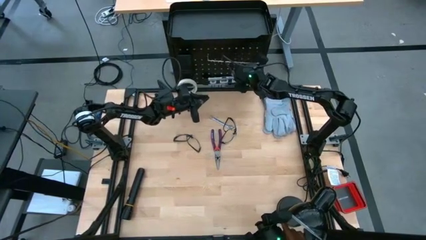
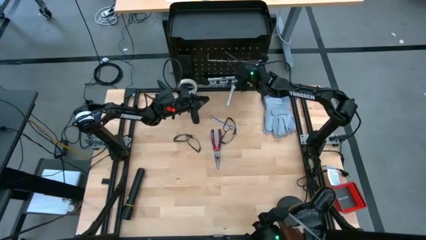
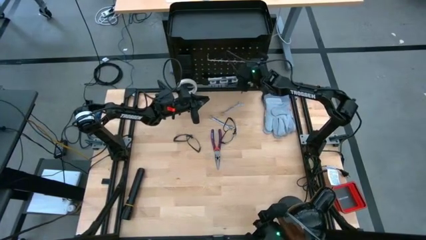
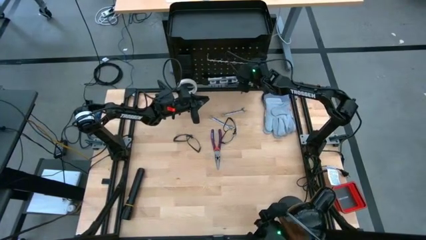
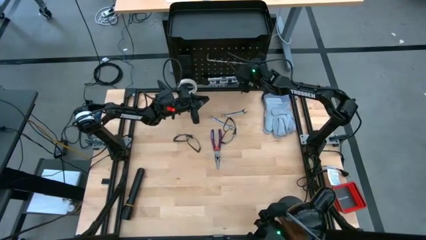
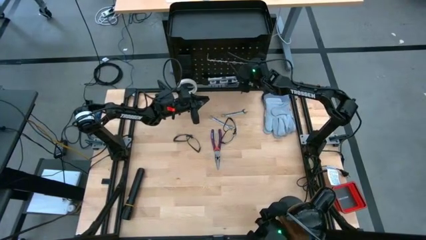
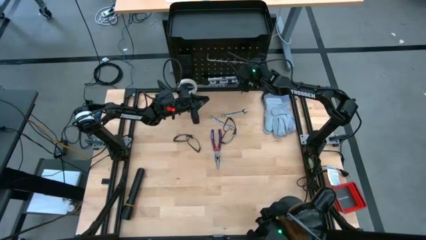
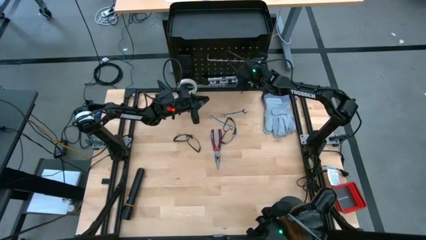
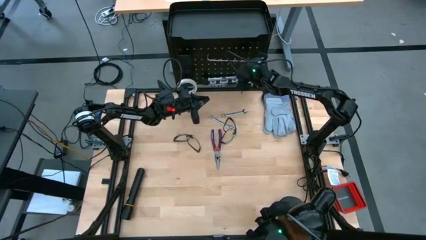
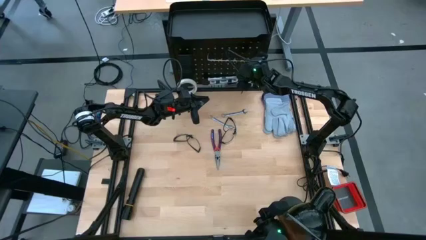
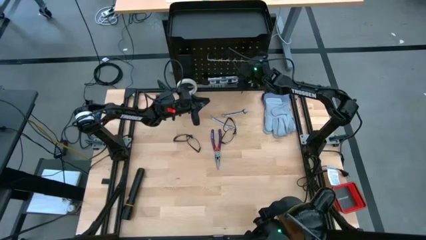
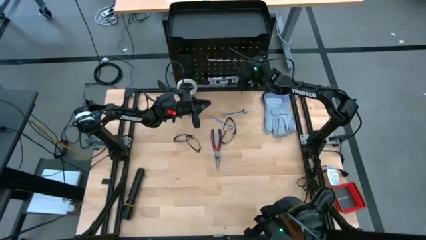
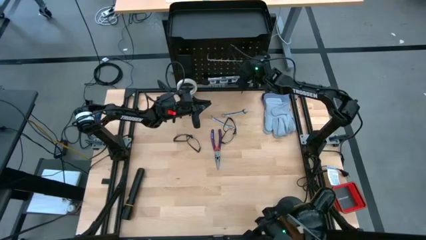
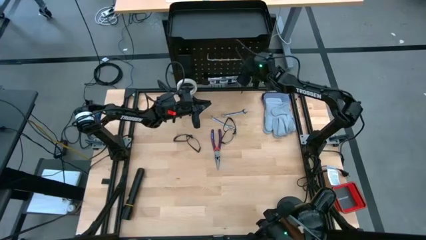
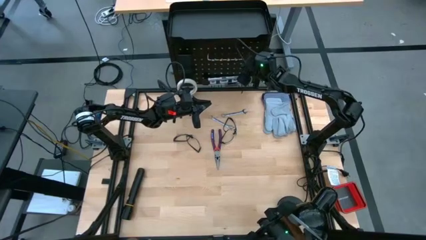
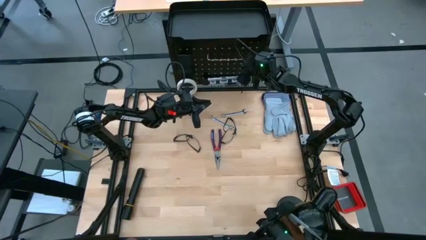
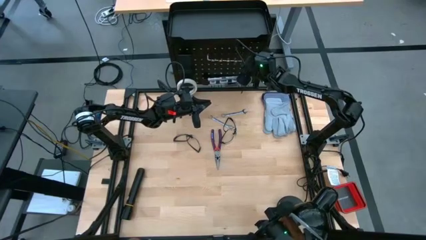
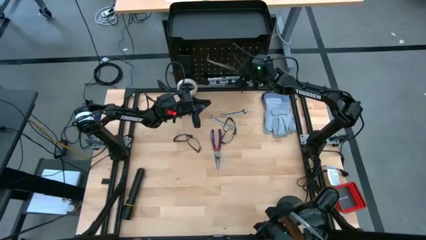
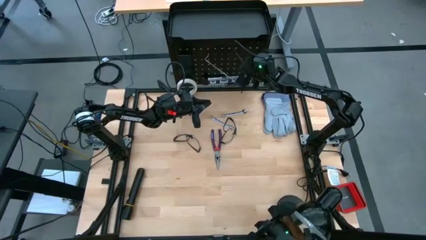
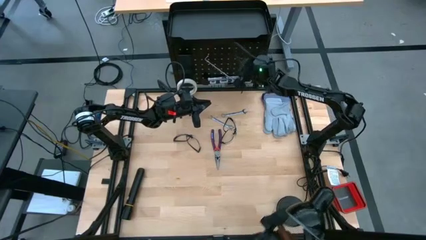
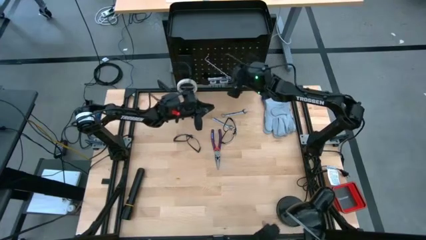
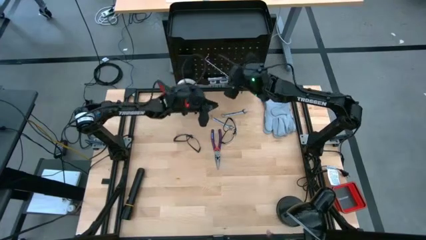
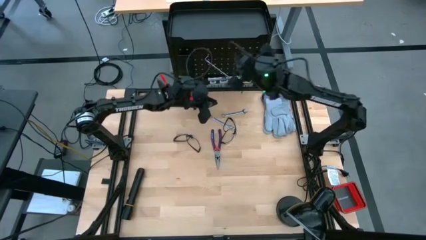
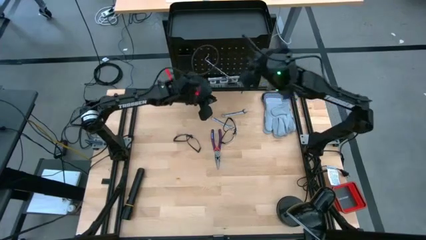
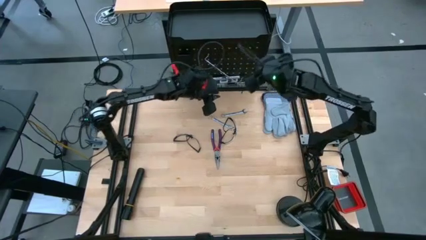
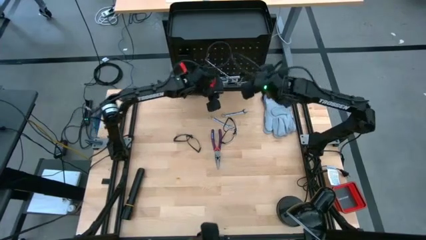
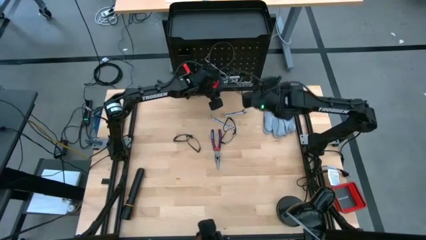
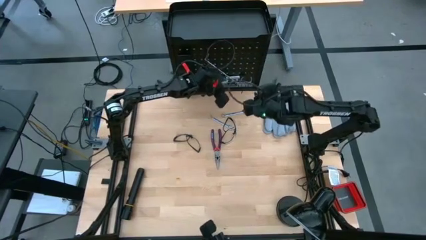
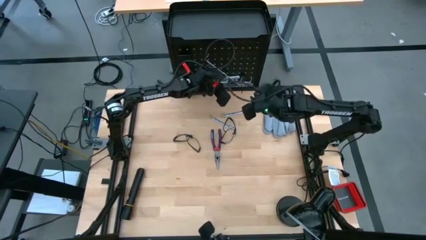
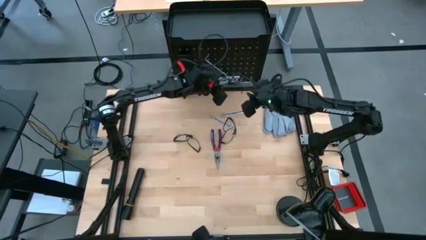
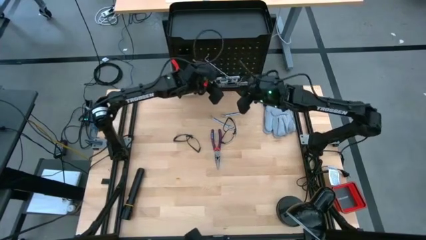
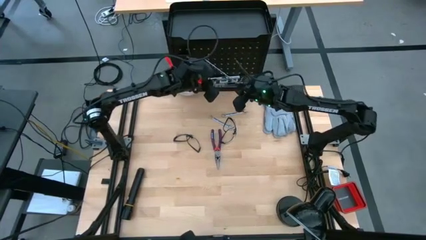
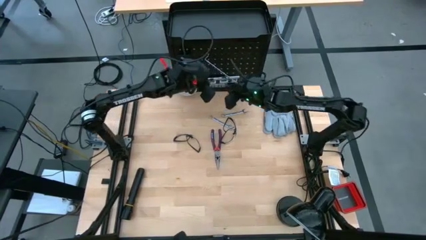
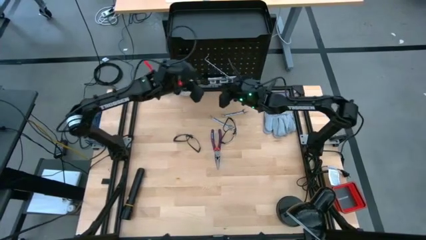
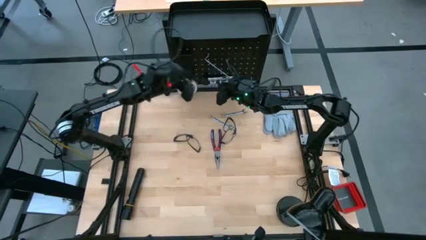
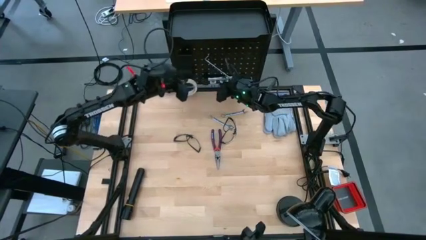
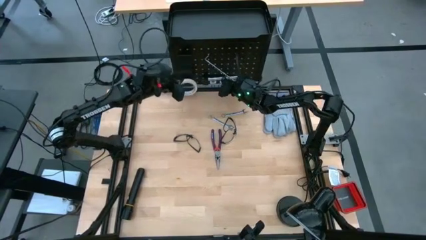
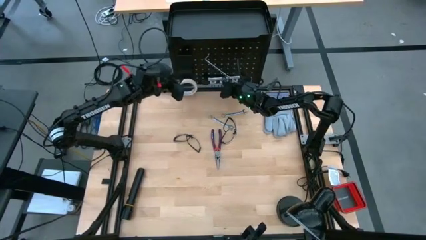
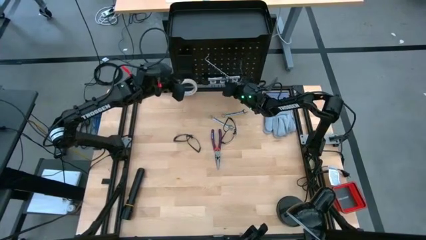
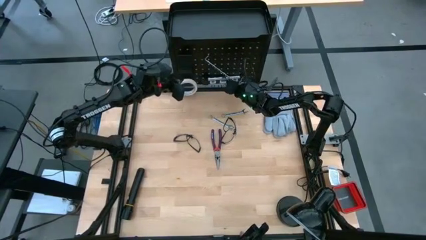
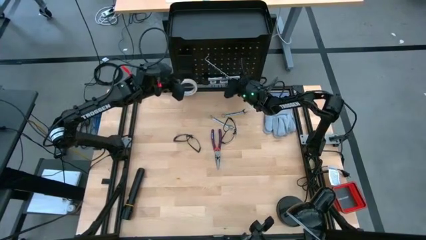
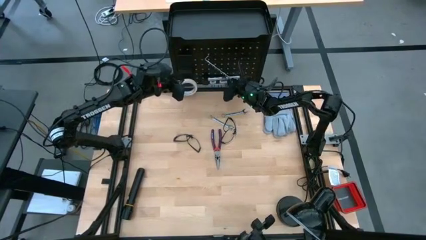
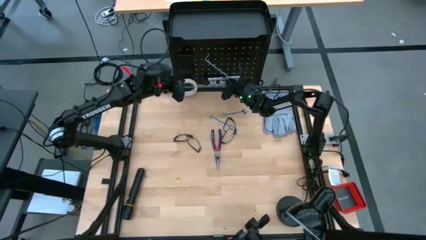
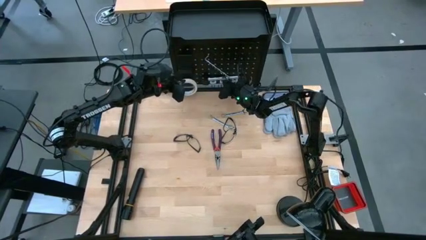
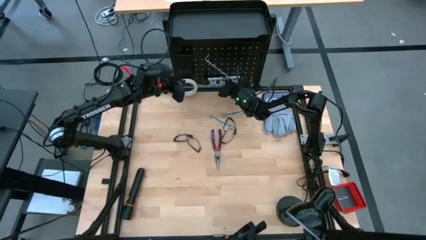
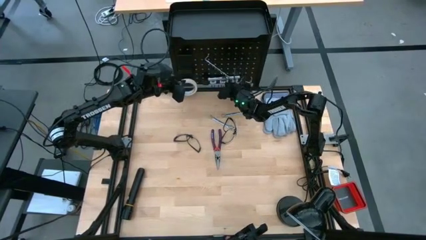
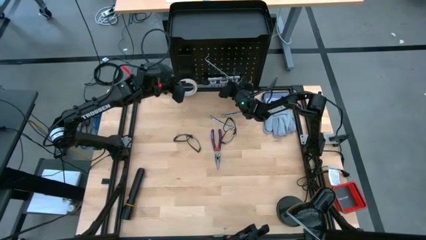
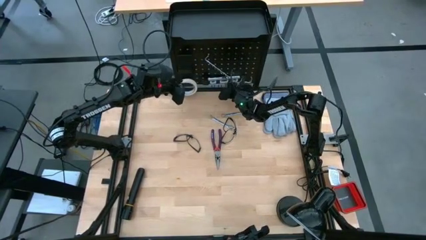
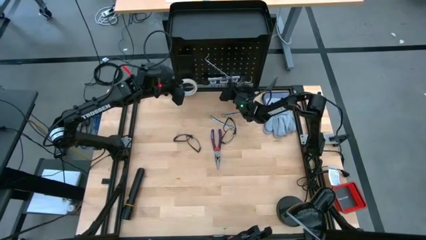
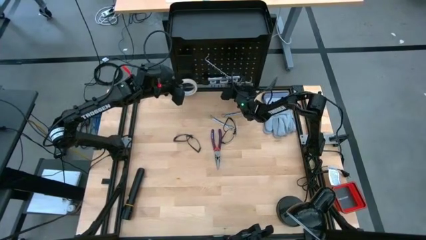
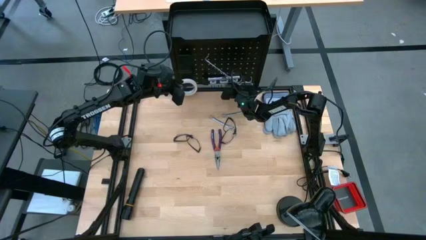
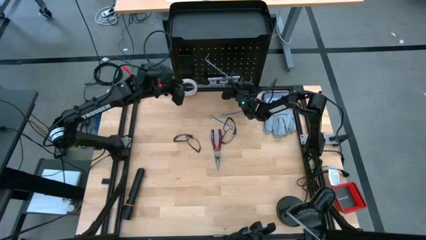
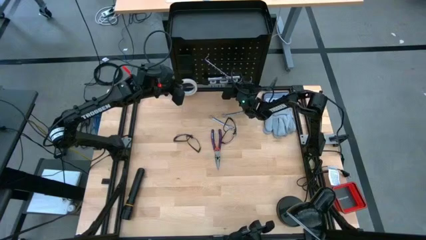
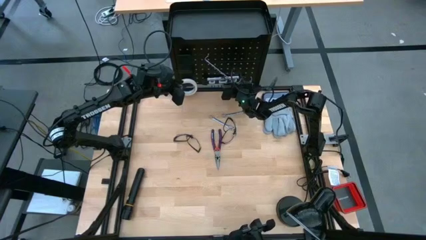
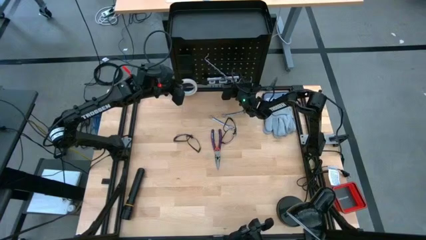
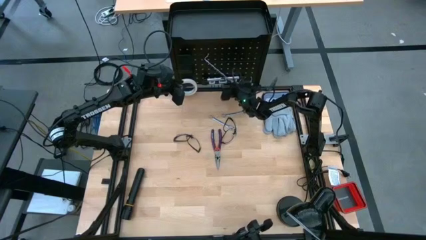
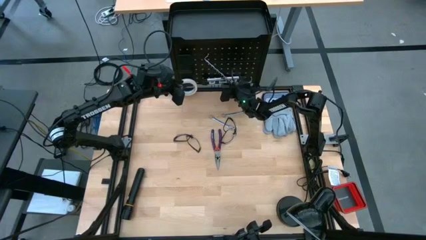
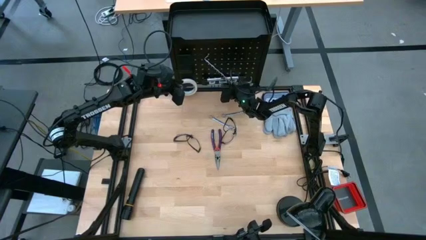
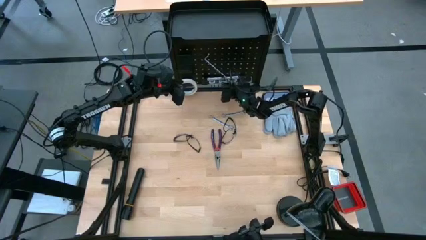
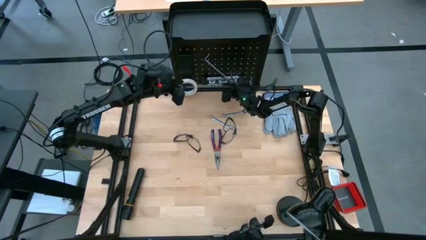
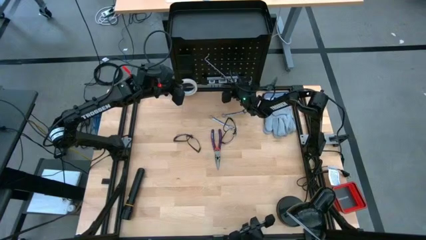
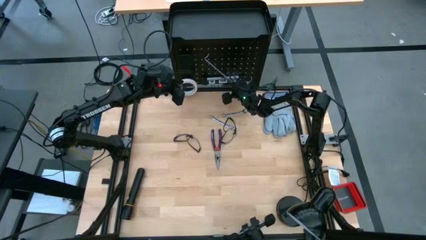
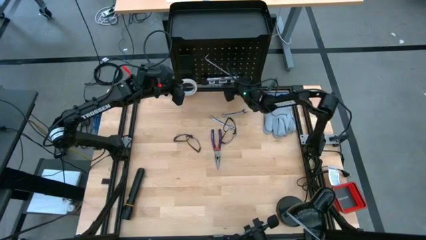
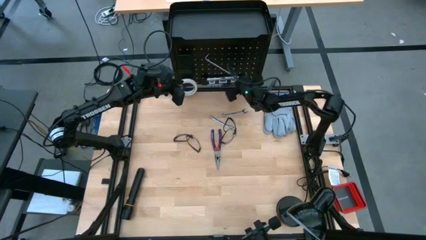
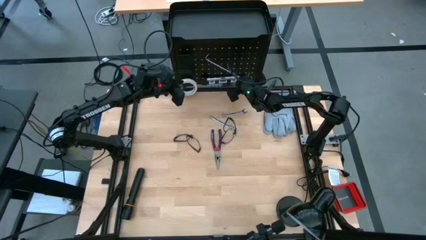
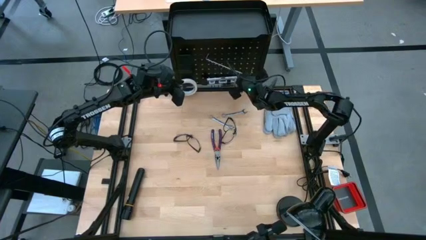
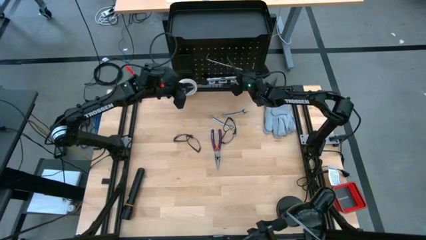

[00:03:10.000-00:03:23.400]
Task: Hang tools onto peg board
Assemble the black pegboard
